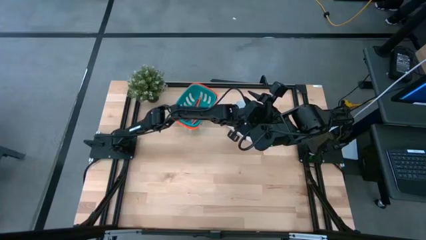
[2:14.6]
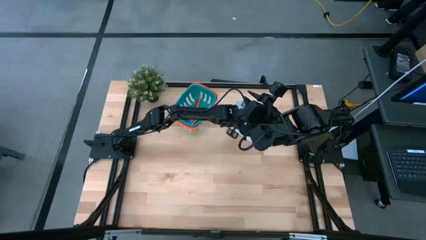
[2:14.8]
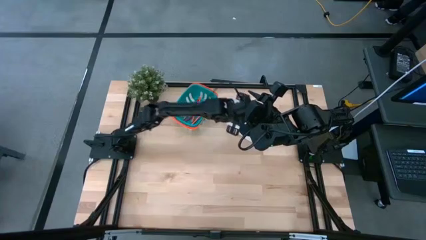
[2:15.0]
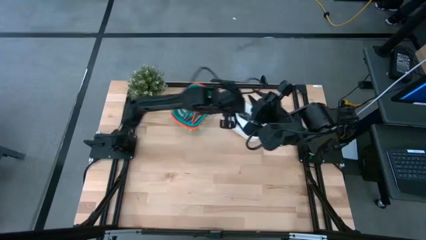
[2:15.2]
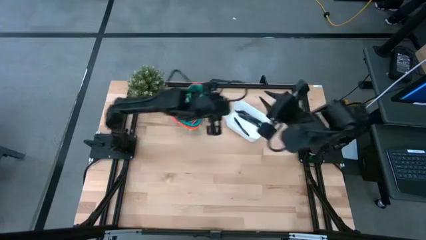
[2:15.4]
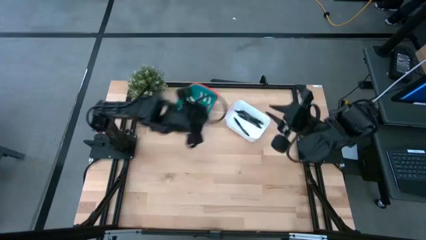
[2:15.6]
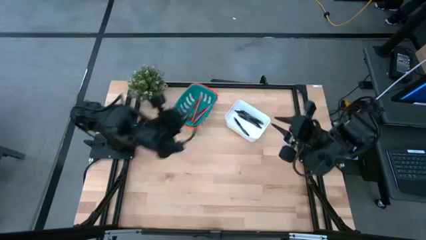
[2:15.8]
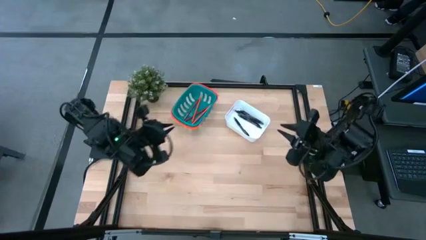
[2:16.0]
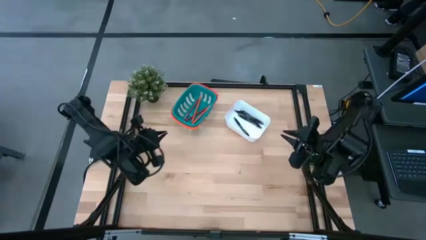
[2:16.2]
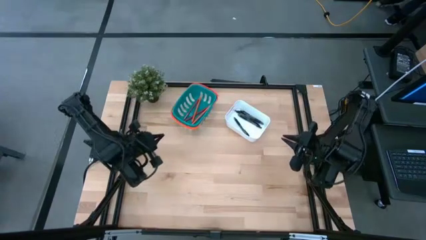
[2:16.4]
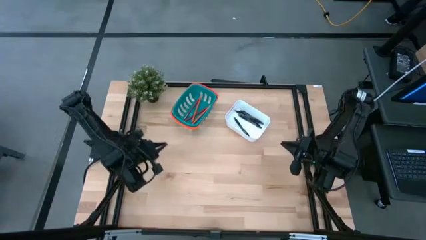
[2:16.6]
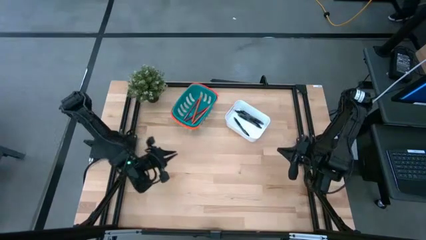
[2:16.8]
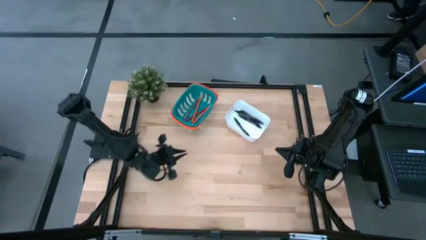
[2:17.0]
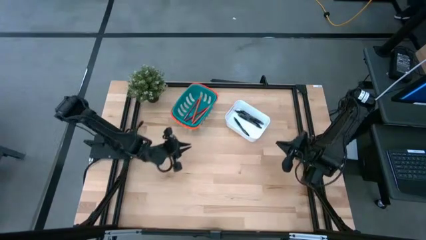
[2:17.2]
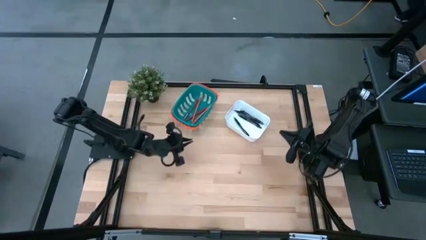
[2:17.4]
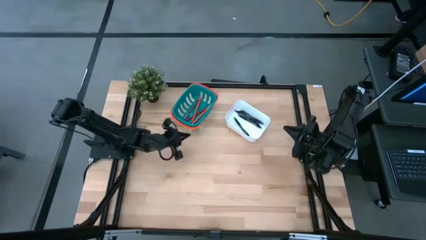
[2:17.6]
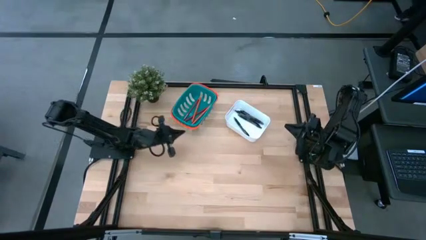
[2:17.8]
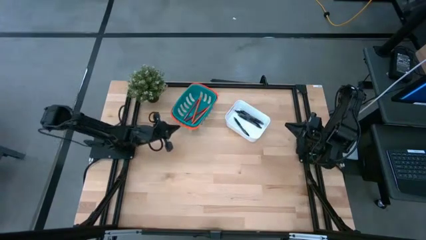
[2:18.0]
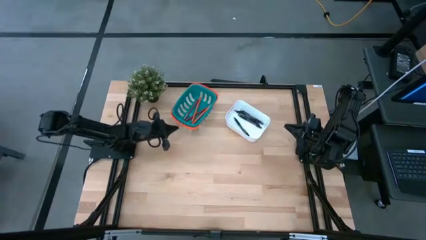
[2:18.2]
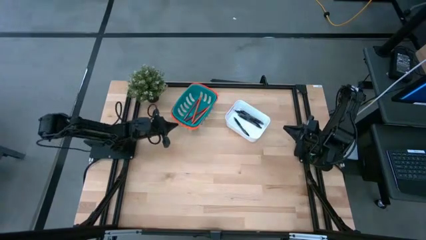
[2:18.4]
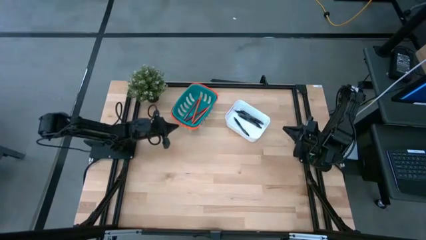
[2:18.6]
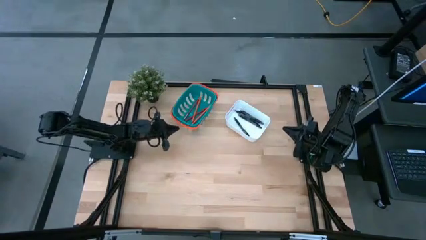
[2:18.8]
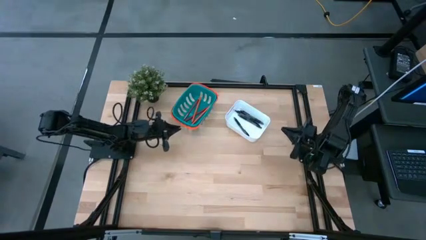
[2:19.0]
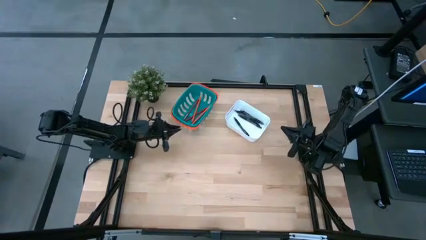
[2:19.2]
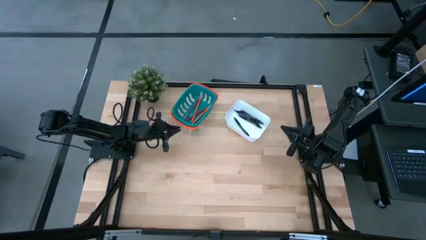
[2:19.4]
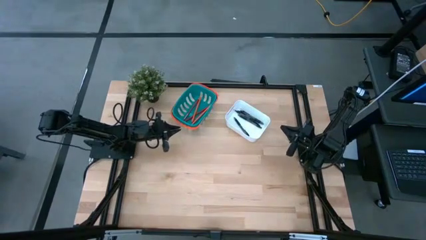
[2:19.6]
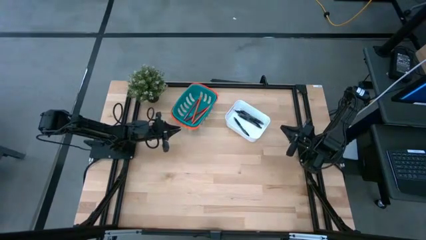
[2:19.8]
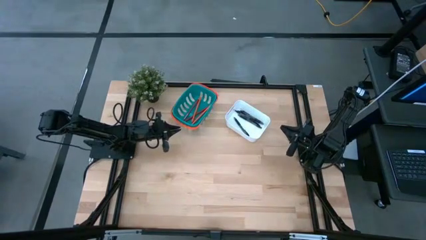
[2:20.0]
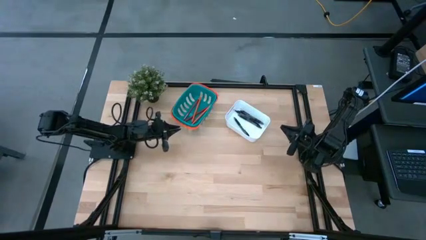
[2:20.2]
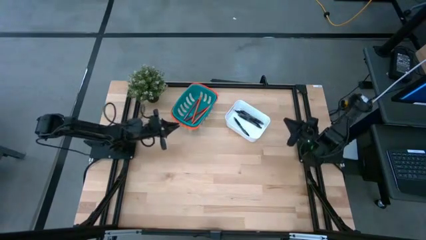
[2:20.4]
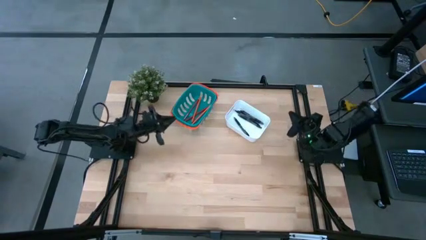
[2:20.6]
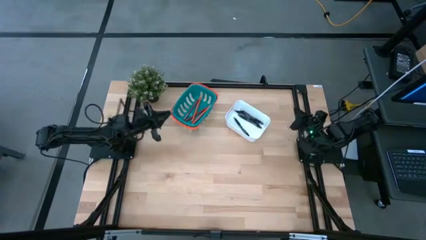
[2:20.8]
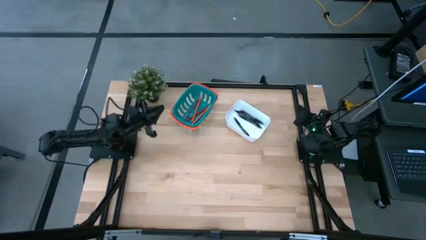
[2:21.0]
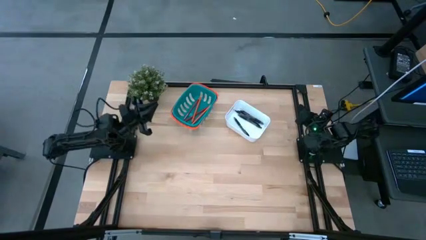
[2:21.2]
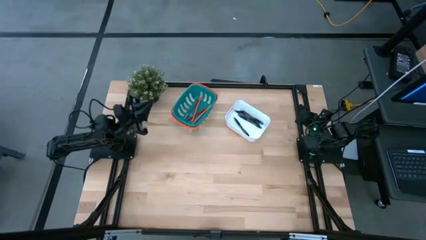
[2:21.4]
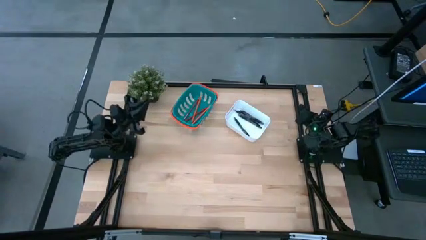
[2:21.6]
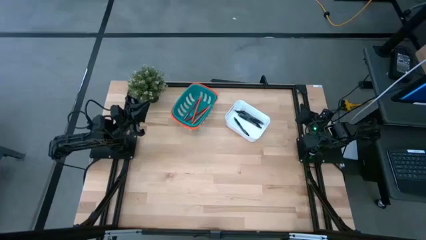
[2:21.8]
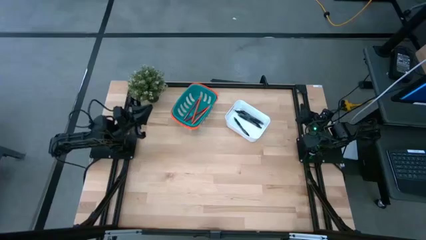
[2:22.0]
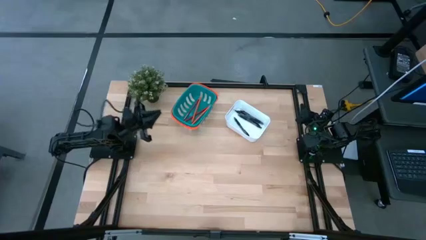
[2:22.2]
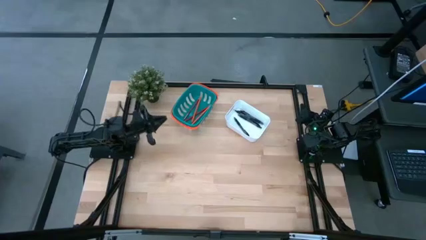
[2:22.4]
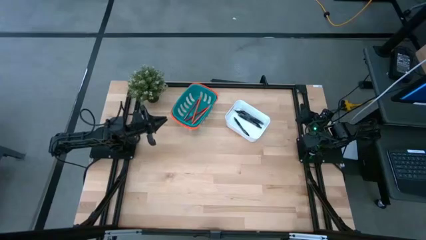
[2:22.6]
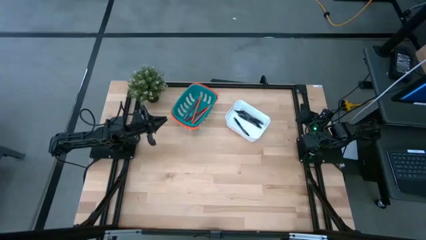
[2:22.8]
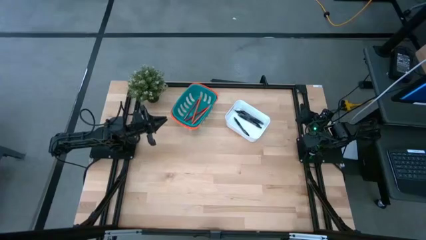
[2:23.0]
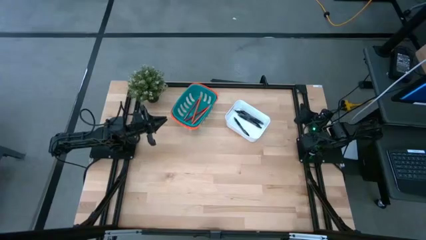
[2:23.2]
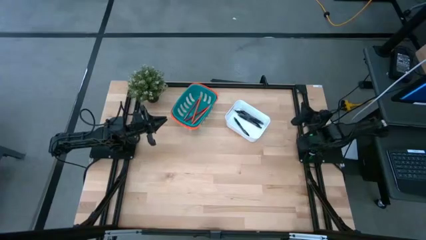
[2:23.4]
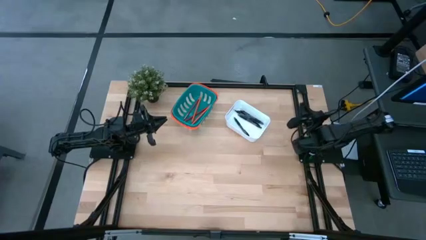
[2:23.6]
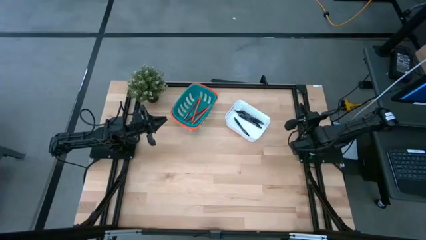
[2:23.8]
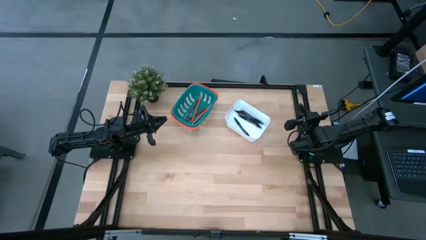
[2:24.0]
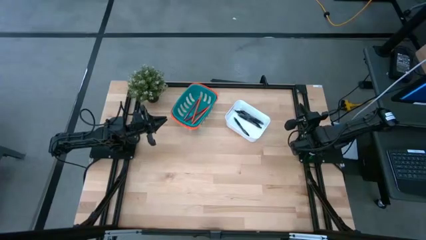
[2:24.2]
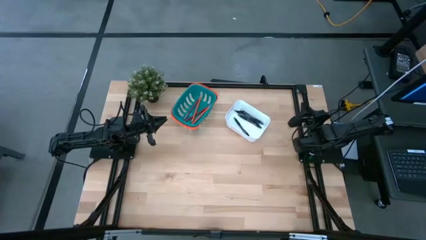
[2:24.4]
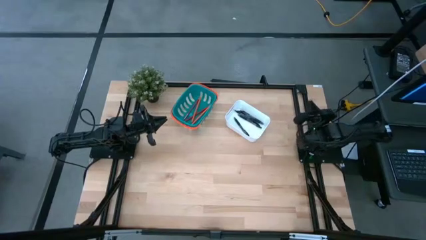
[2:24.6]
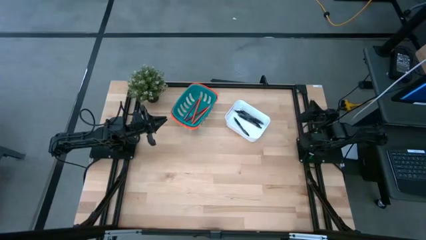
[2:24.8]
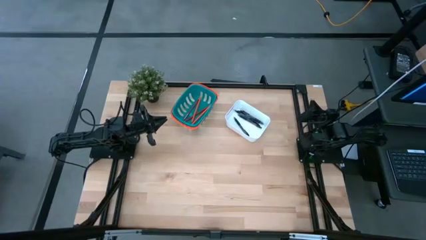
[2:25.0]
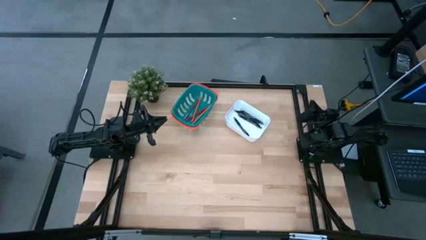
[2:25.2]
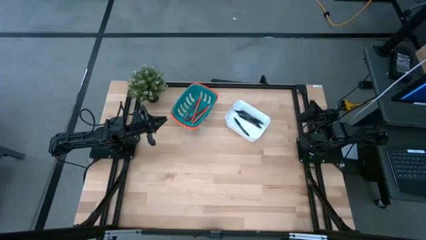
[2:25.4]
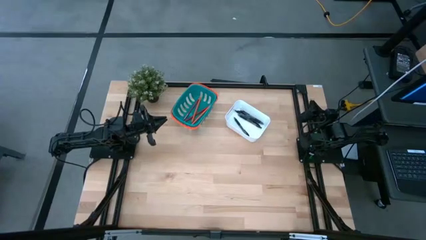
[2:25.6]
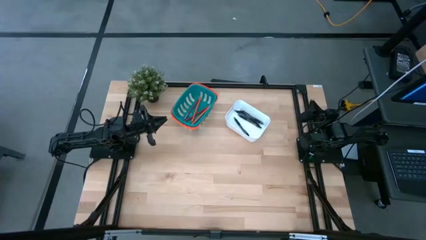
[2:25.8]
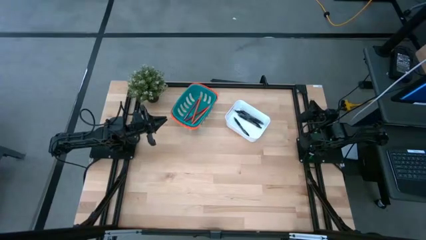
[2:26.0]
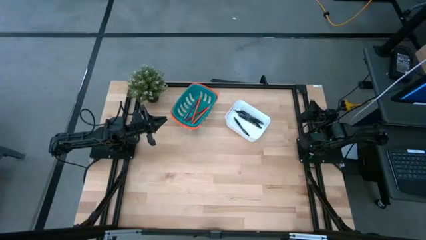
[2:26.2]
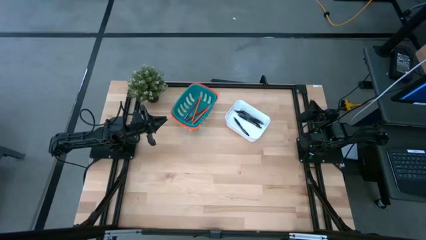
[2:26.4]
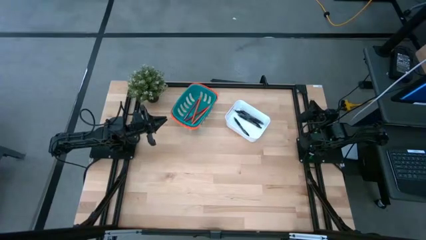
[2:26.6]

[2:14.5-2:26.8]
Task: Sort pens & pencils
Return to Home Position

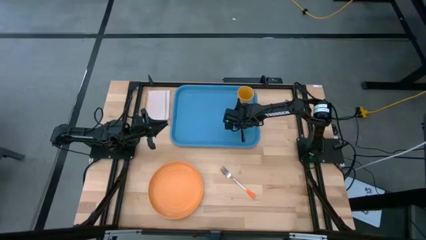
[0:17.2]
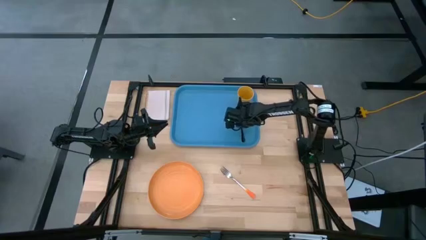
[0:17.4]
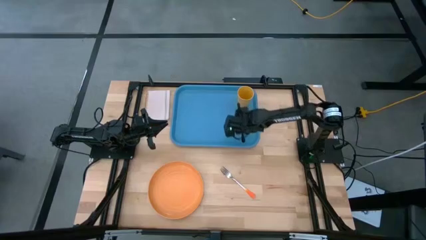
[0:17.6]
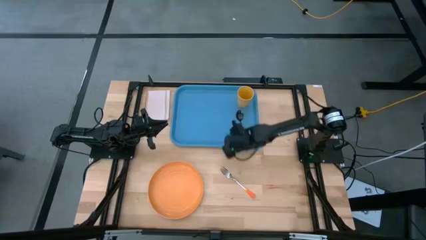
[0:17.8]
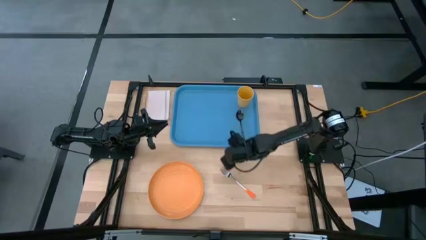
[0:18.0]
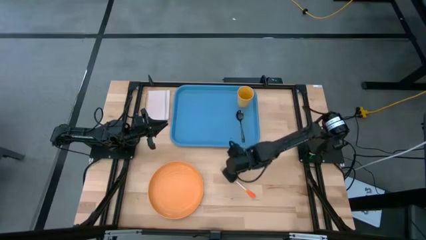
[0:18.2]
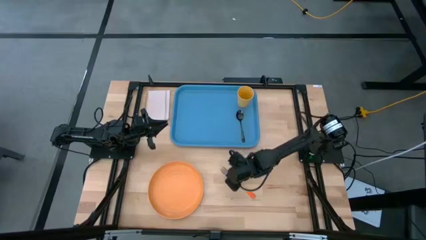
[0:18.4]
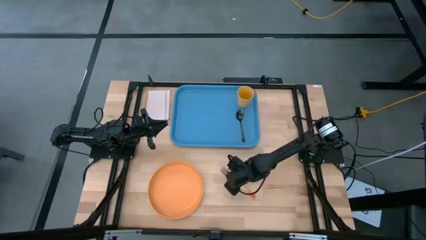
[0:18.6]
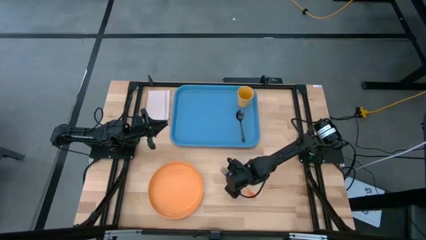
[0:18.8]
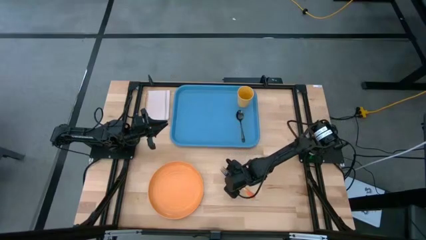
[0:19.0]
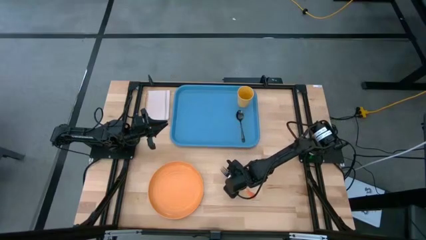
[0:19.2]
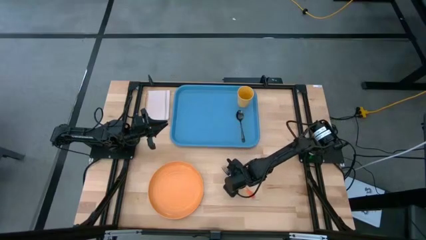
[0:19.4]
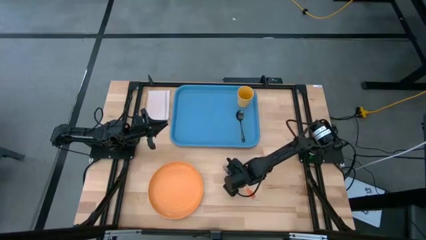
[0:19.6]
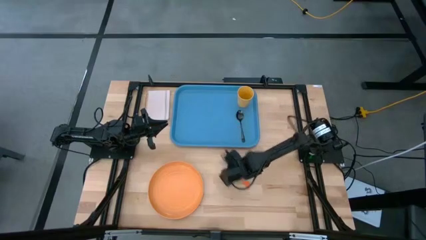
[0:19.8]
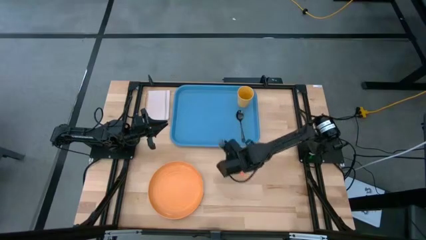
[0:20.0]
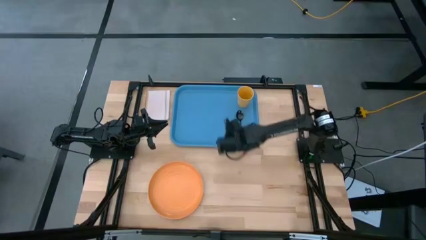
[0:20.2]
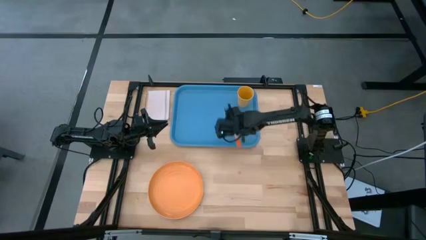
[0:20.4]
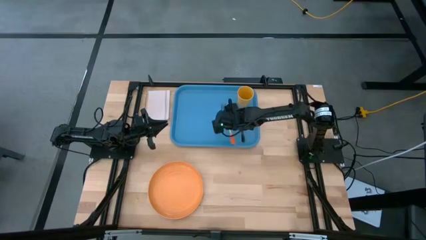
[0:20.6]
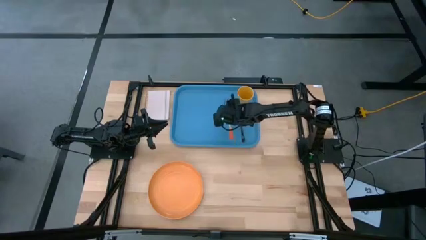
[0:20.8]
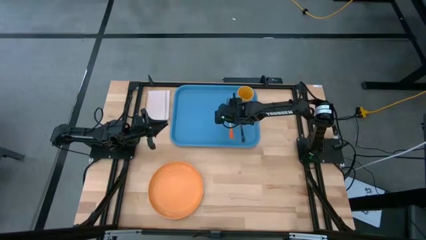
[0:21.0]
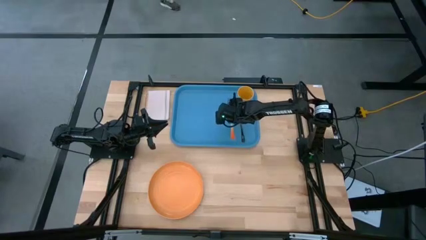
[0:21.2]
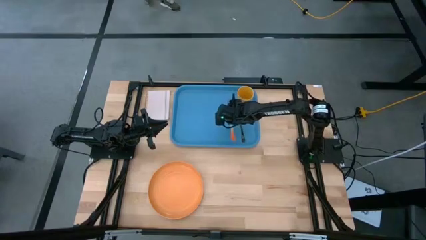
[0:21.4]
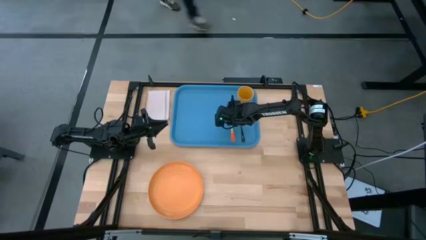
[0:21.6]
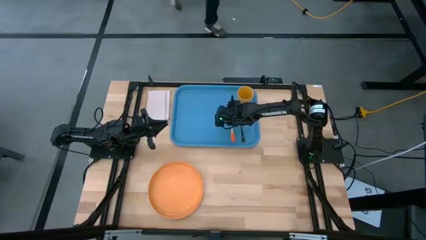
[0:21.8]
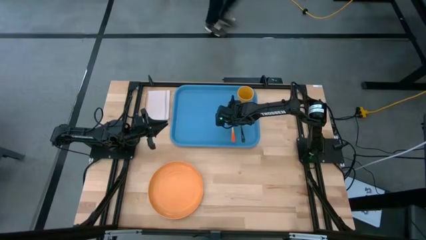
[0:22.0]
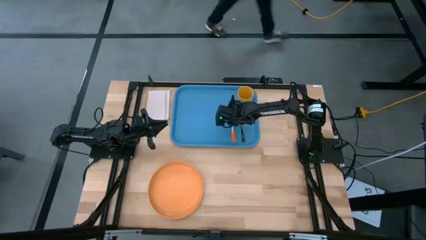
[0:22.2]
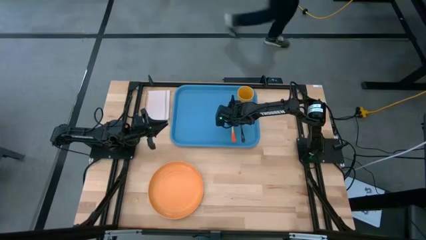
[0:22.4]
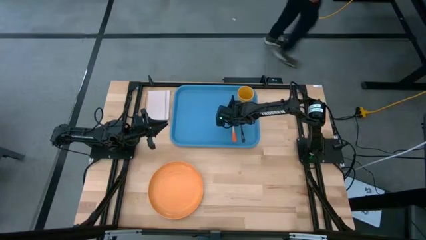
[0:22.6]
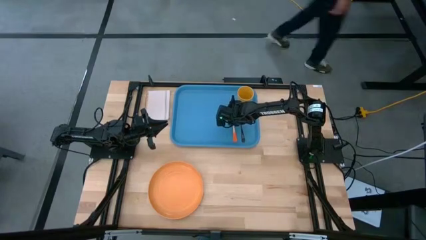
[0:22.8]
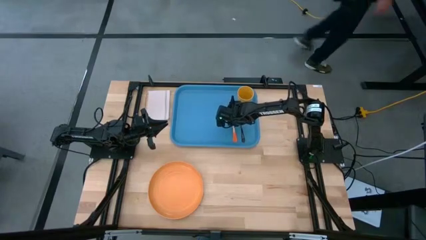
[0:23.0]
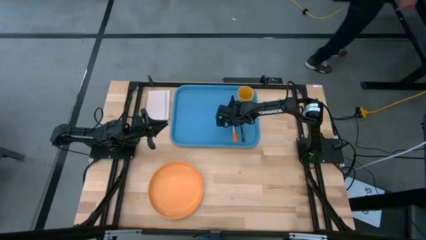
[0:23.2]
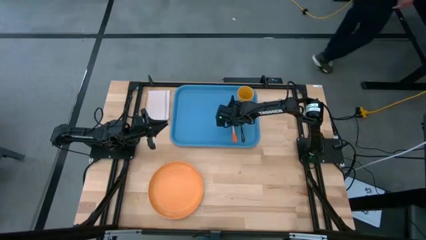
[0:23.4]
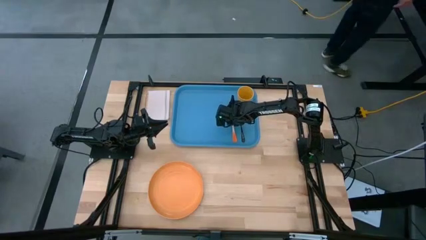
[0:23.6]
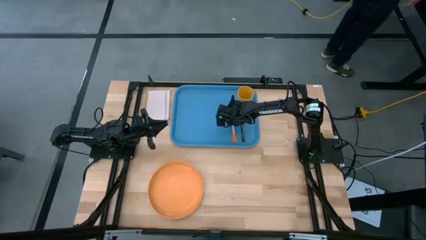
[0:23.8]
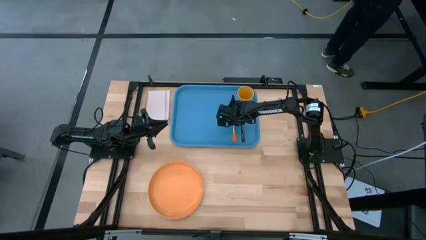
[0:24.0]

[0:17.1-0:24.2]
Task: Pick and place plate/cup/fork/spoon on tray
Put the orange fork on the blue serving tray to the left of the black spoon
